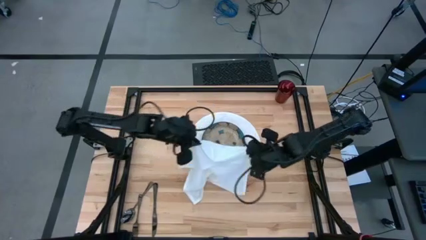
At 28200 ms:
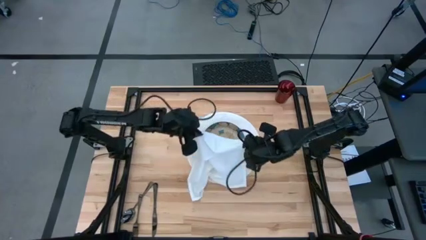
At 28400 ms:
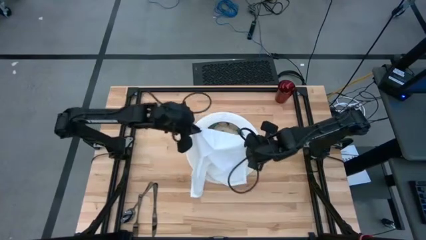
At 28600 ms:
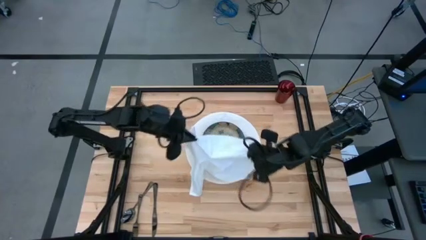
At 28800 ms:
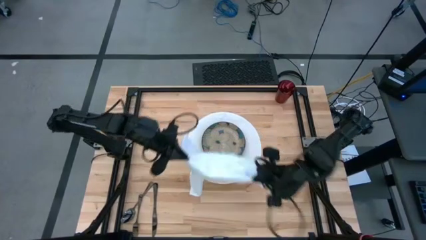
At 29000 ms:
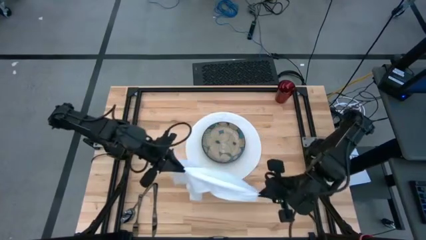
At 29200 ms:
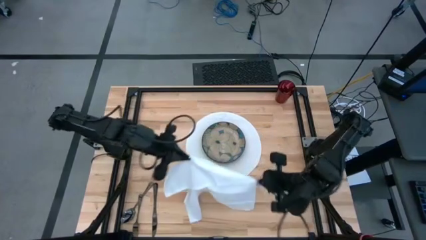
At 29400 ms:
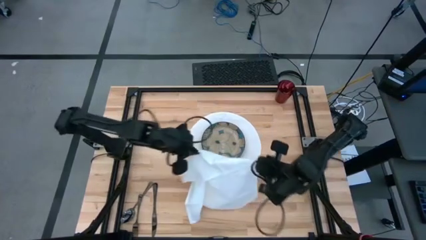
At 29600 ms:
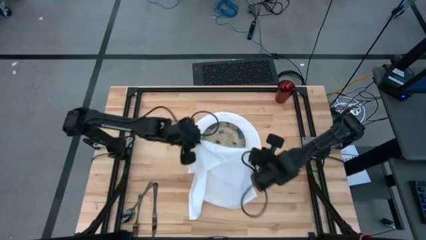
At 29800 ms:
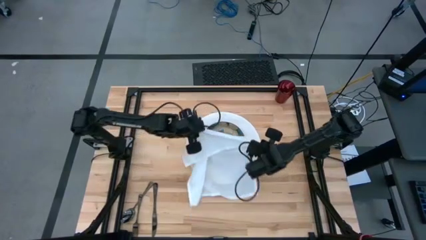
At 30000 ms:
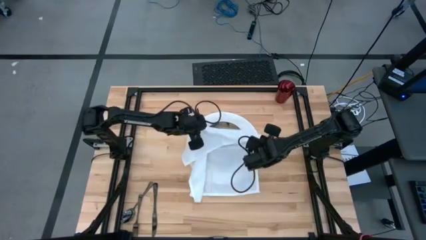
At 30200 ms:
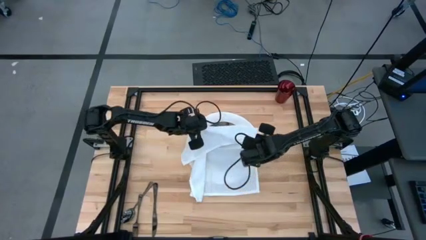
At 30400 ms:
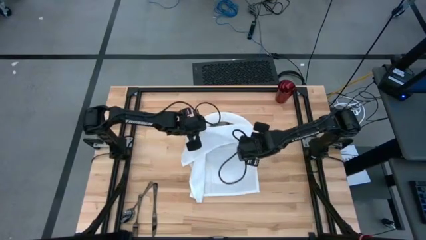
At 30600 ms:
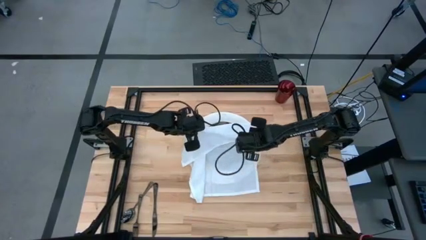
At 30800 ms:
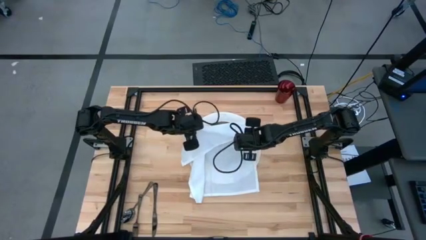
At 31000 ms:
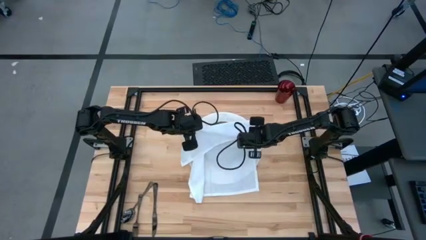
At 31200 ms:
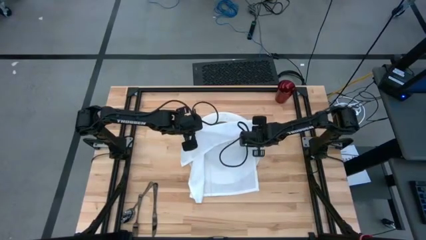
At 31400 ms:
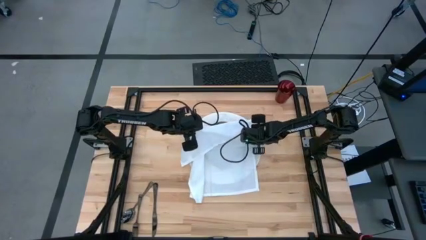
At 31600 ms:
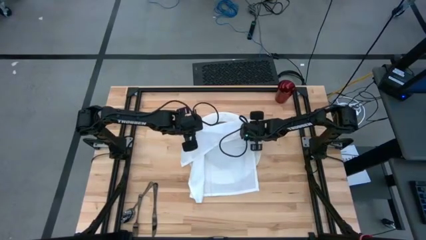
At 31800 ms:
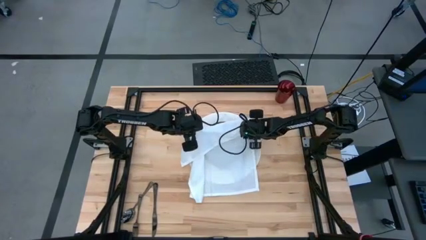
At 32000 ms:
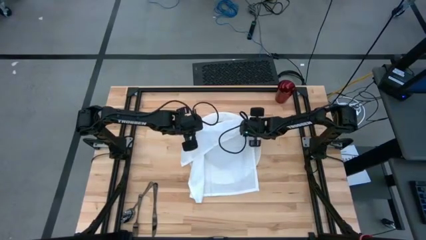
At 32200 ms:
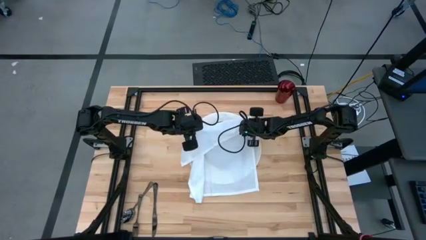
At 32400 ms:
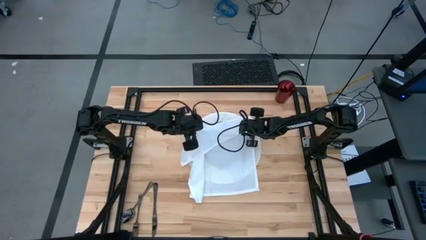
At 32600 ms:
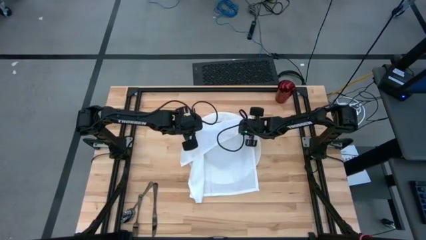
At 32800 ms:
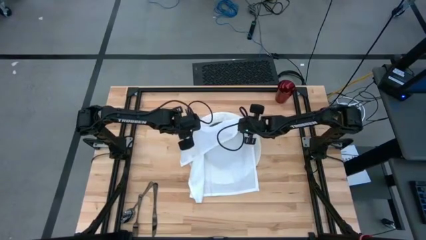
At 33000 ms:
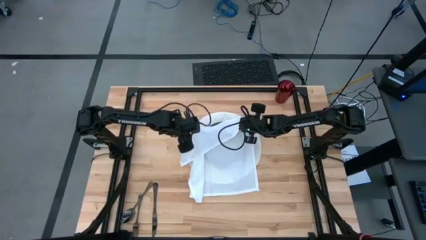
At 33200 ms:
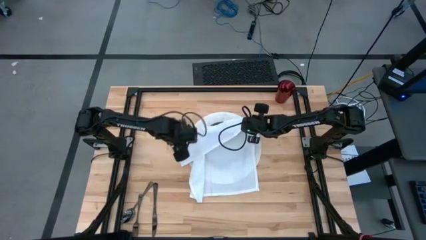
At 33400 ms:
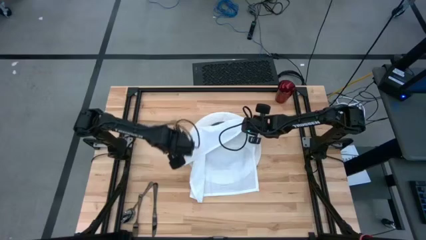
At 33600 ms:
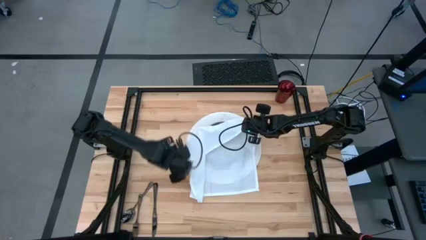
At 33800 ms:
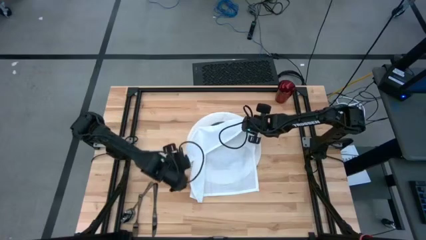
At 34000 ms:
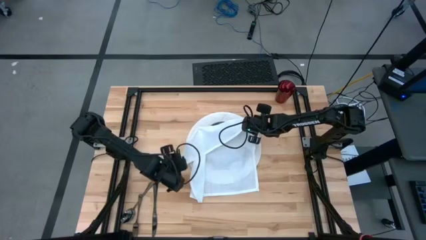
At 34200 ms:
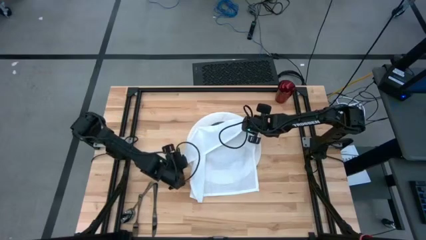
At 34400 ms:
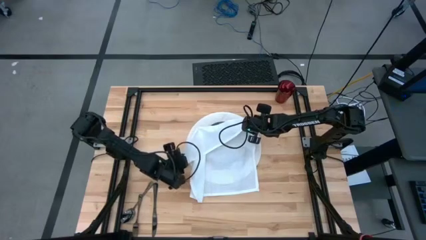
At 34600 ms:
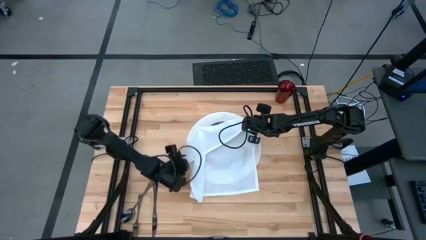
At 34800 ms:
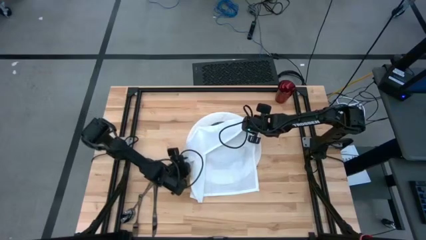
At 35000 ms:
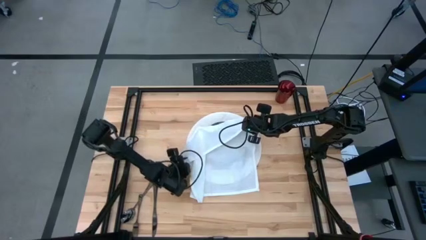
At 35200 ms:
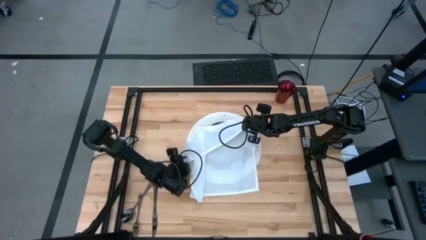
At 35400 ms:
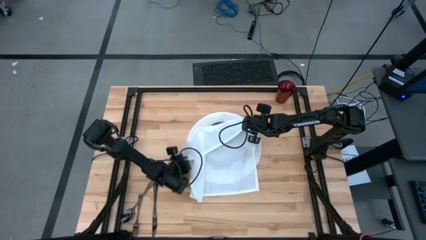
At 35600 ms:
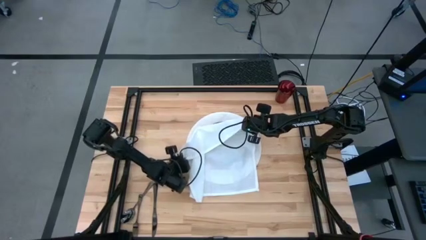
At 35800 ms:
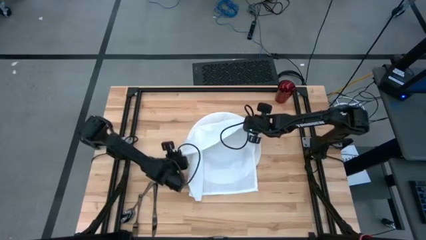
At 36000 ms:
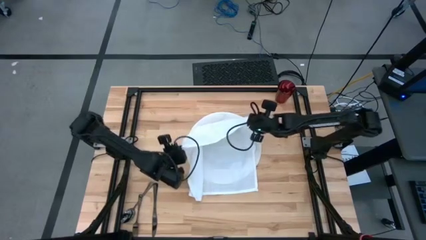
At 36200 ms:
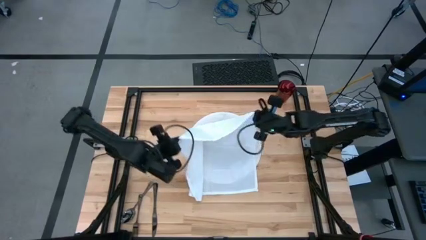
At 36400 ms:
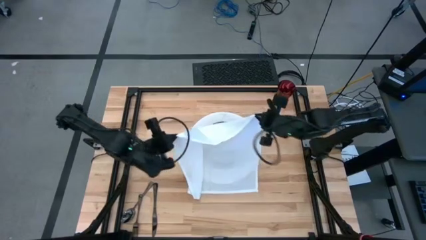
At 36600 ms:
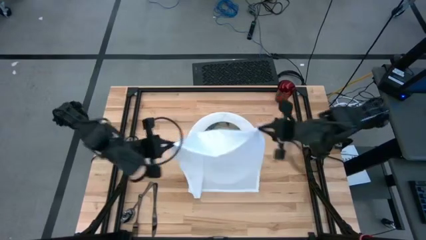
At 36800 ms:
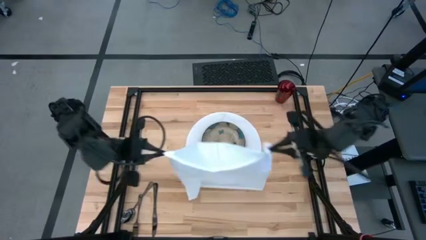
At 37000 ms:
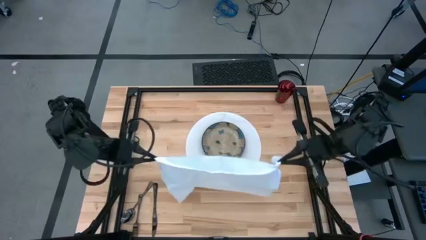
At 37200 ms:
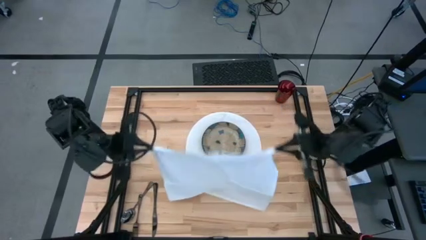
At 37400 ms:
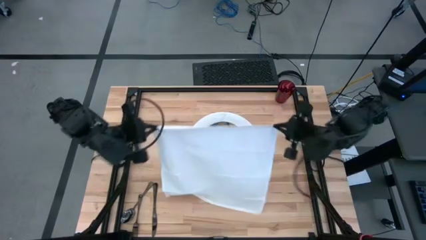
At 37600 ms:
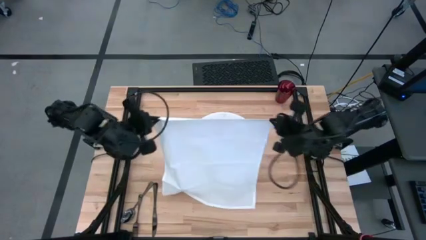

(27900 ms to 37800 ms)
Task: Set table place
Fold the white napkin

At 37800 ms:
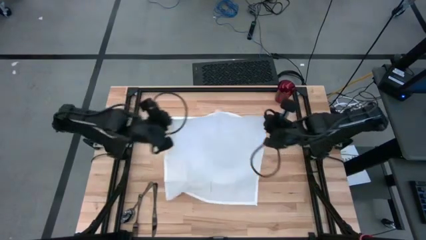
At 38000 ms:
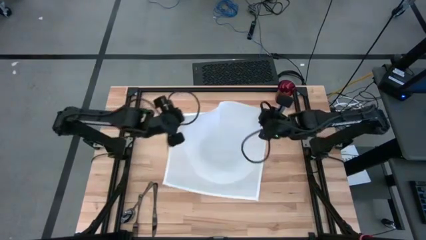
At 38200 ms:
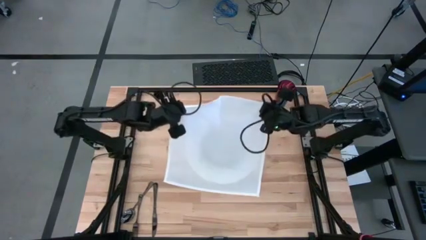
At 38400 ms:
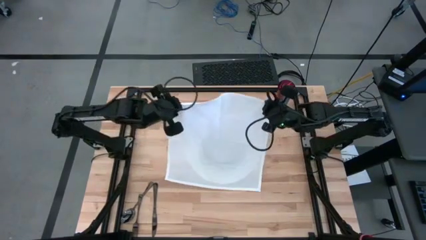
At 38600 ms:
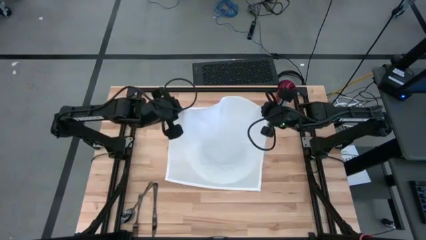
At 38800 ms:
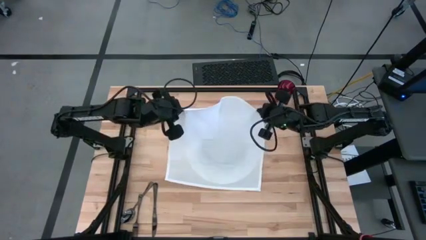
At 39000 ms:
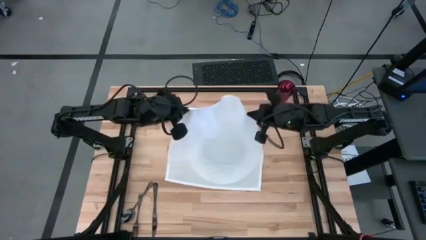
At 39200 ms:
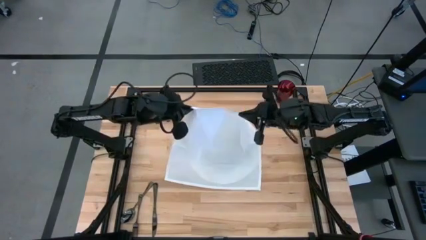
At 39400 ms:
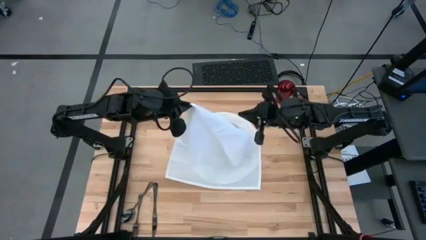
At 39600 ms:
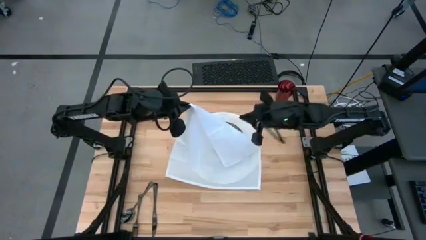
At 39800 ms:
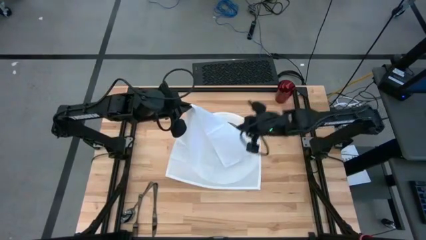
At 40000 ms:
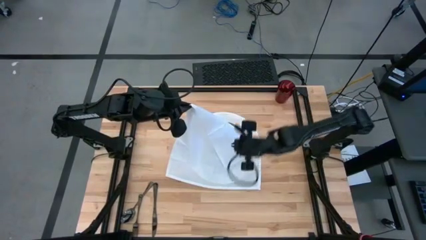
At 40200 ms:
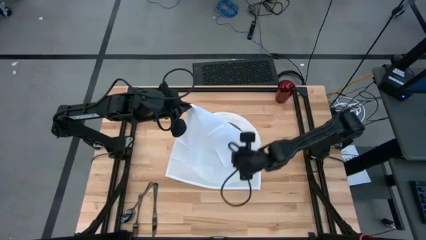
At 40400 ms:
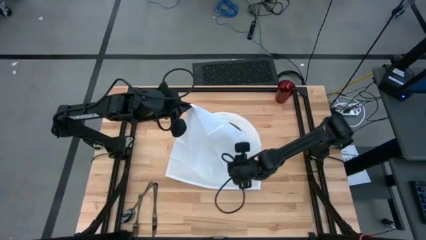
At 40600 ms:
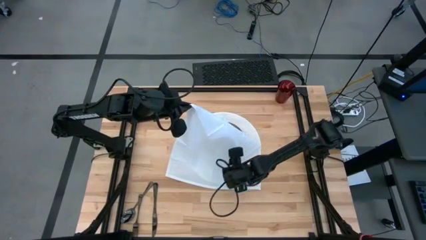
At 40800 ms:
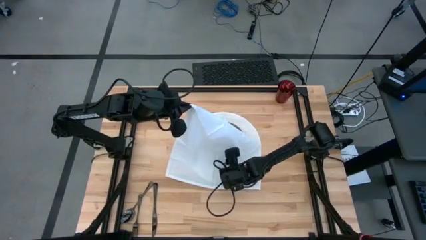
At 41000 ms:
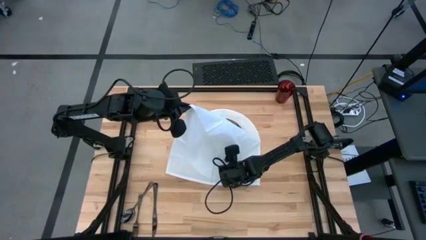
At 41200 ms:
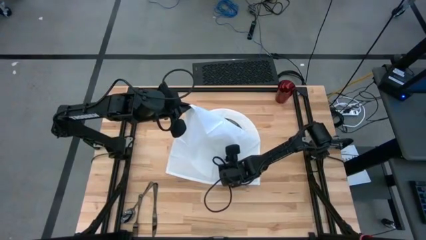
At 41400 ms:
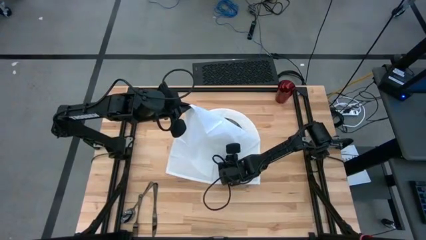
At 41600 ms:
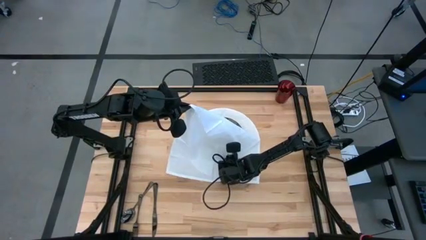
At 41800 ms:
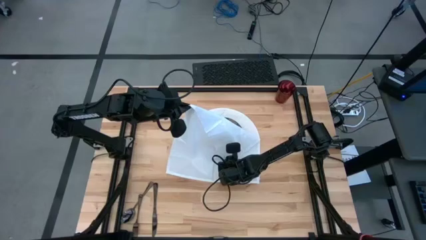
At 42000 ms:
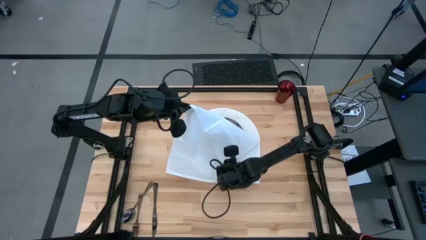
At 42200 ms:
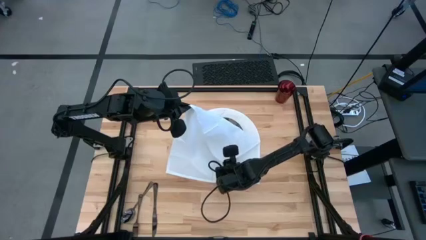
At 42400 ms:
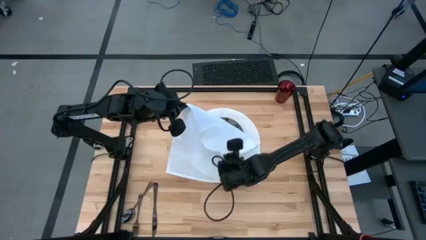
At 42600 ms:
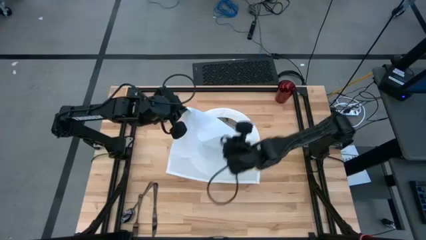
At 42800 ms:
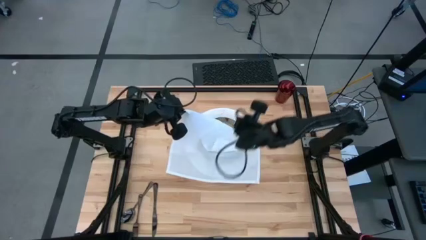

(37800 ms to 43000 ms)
Fold the white napkin

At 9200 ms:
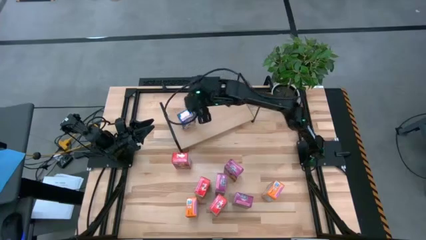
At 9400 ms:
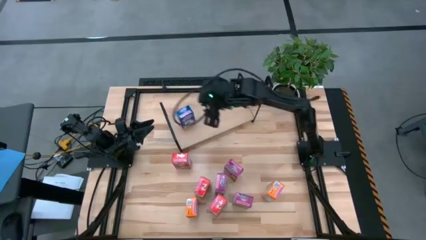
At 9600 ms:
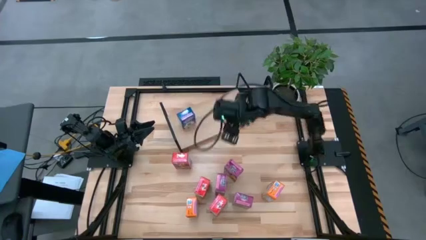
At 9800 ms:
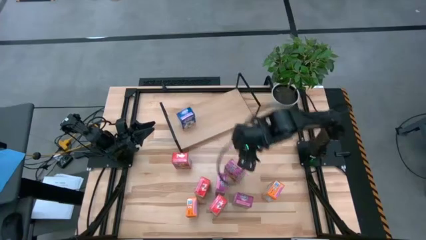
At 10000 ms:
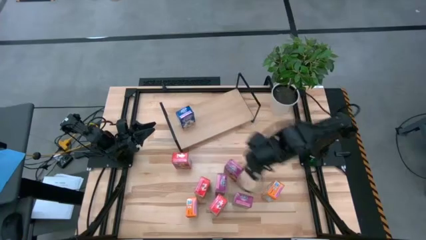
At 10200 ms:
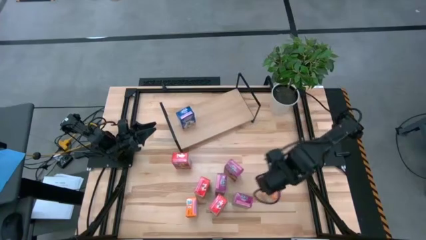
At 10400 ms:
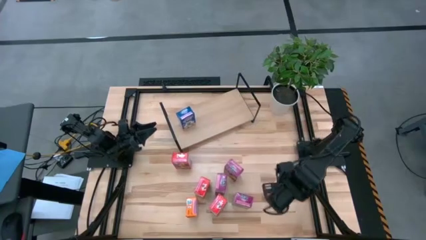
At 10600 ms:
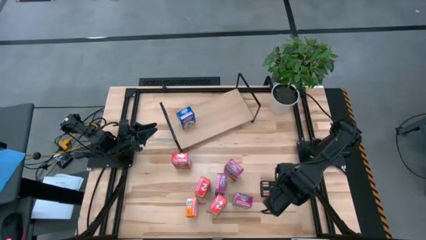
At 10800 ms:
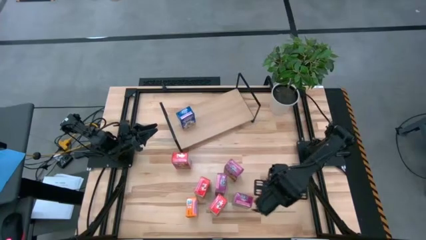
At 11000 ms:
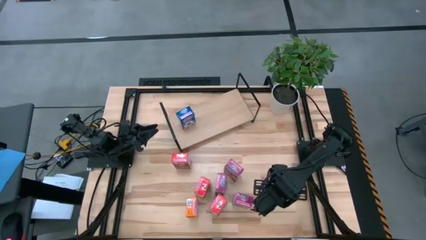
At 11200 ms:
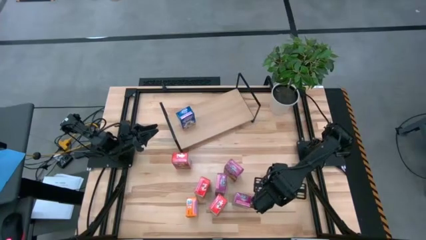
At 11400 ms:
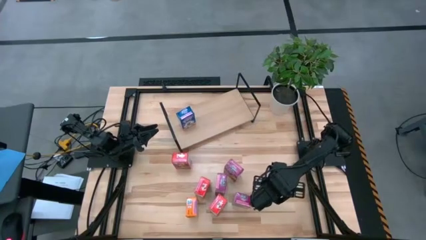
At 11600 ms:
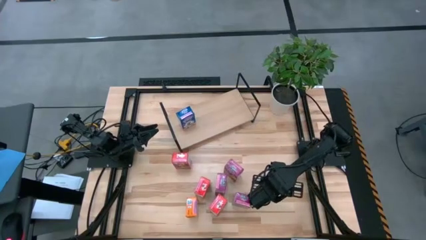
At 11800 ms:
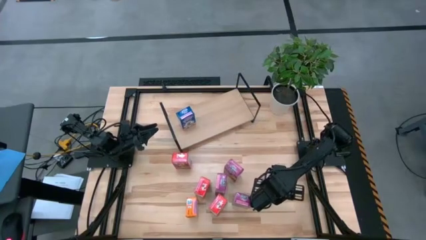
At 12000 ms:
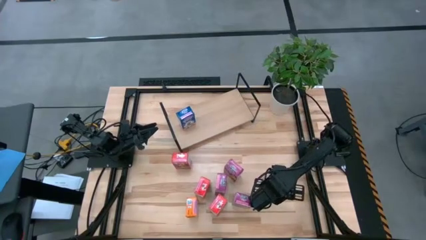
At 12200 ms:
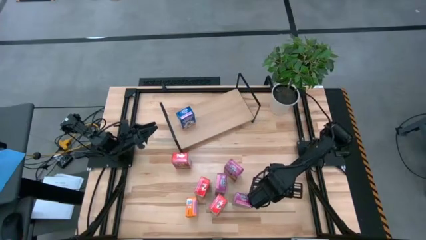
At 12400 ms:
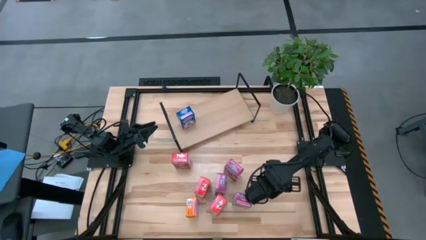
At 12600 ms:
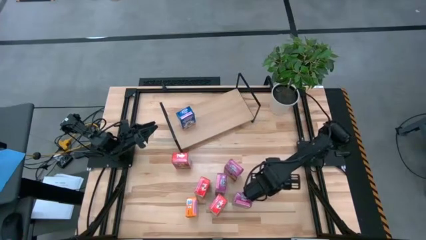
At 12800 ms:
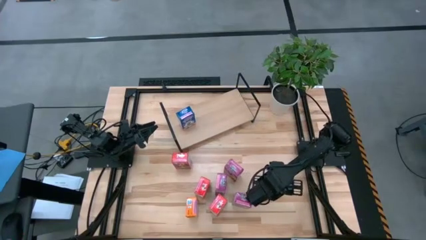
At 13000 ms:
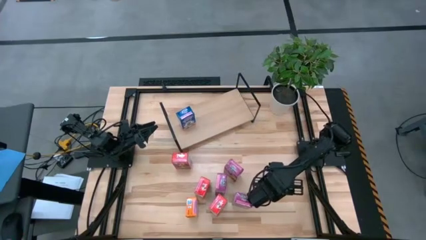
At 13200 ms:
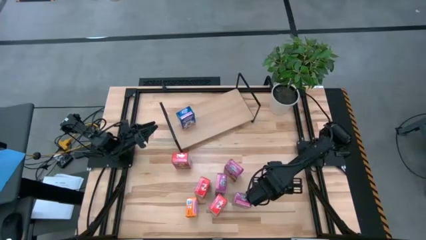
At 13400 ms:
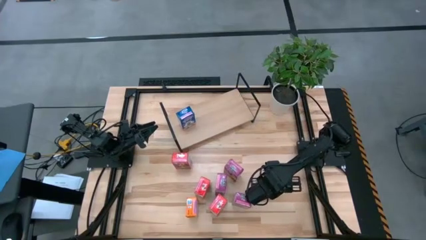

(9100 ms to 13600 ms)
Task: Stack cereal on shelf
Put the right orange cereal box on the shelf
